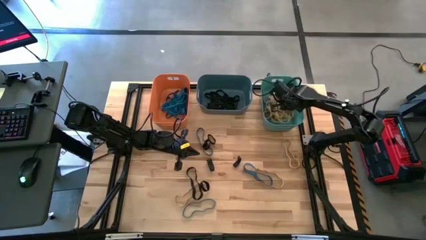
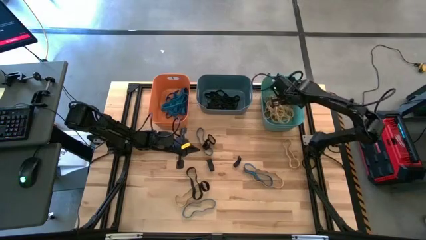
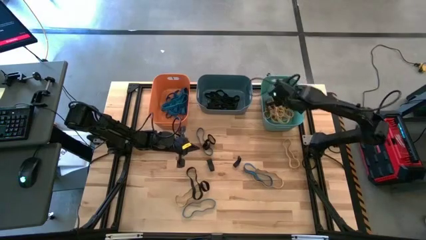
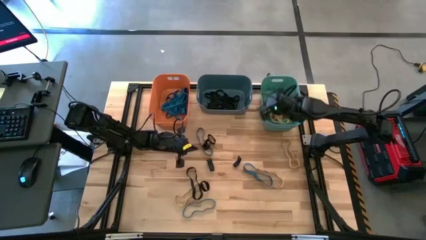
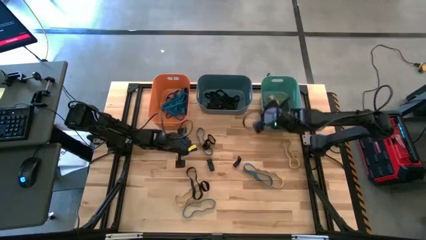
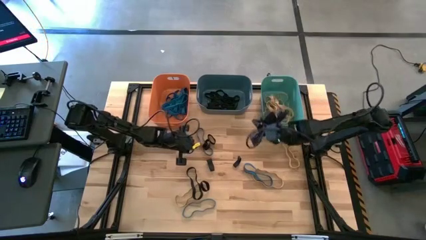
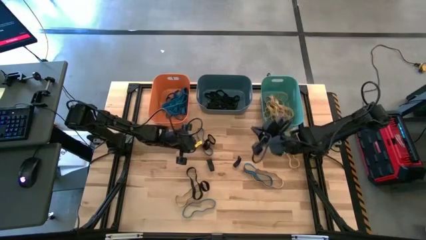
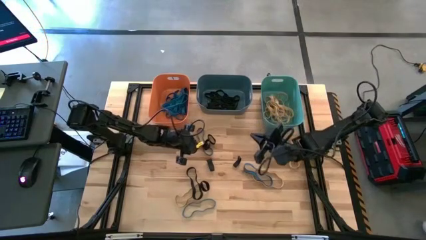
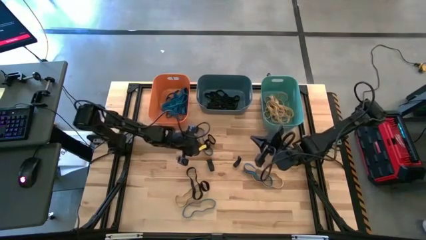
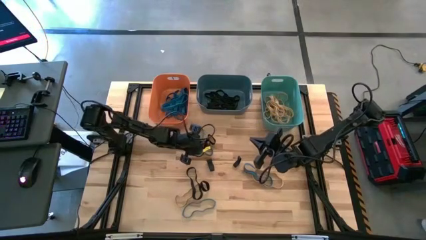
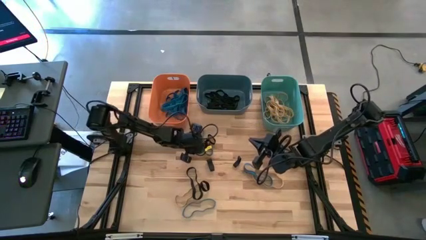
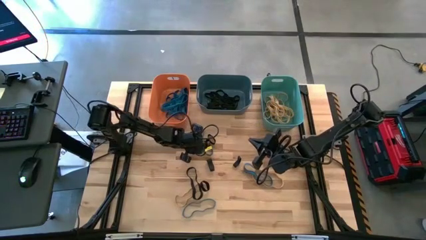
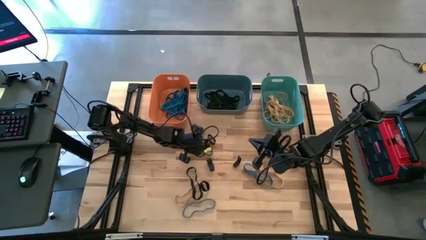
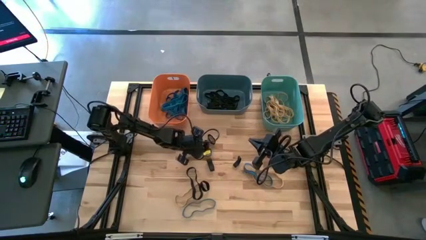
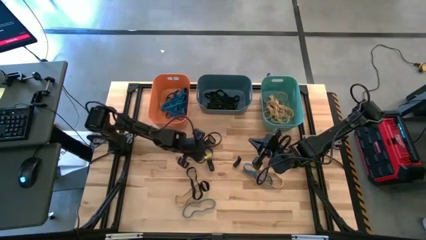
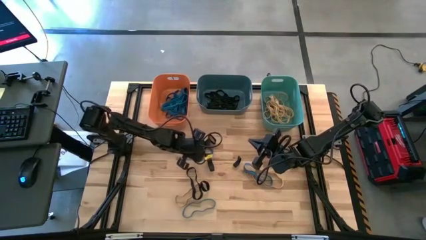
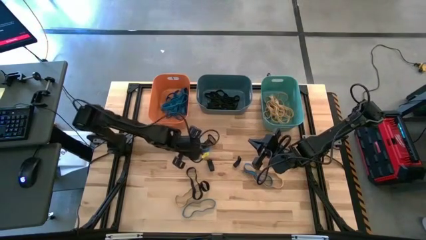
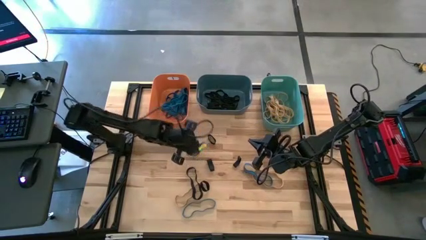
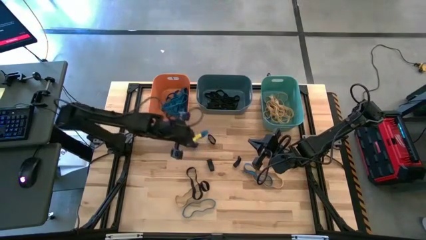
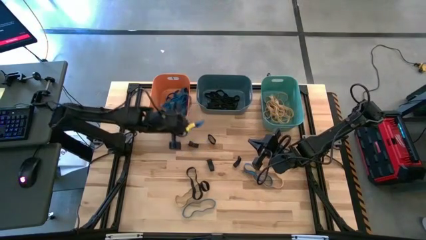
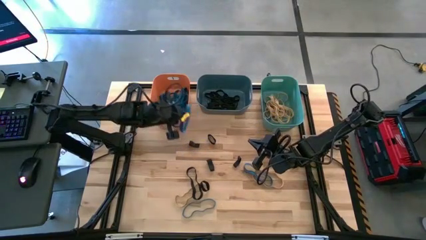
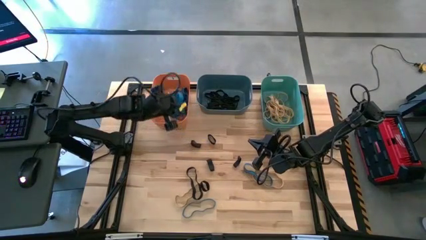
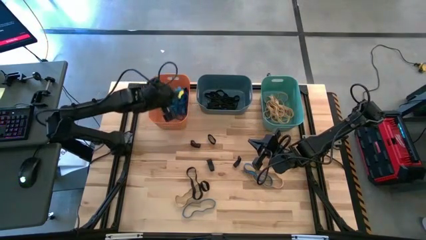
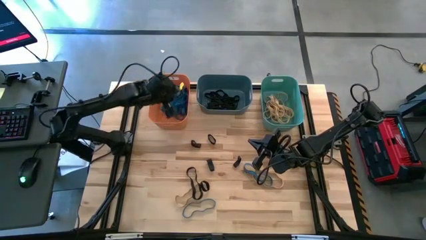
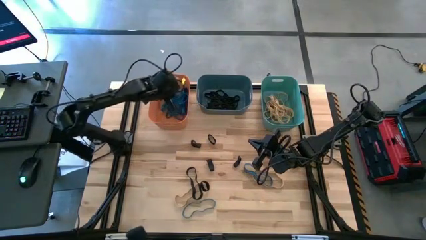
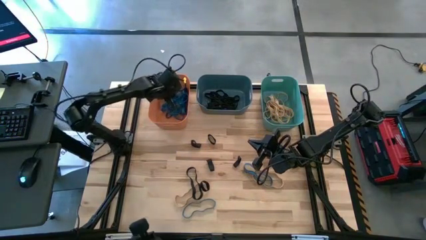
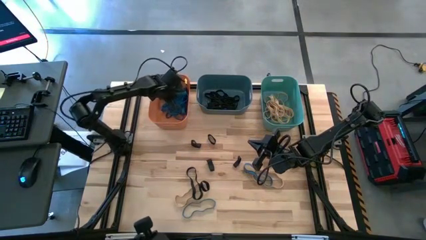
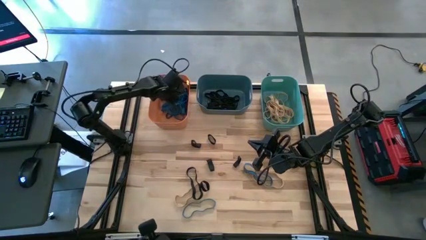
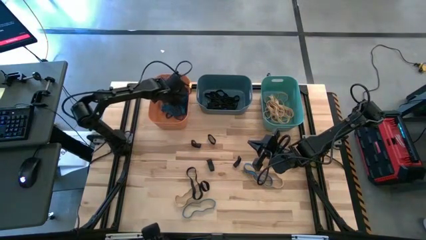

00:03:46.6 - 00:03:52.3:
Task: Sort rubber bands into baskets
Put the blue rubber band into the orange bin

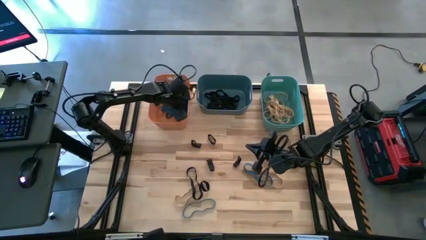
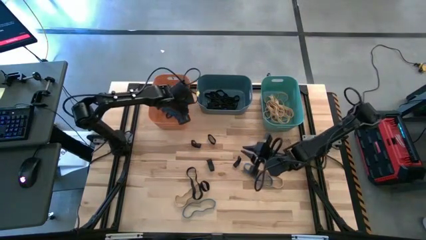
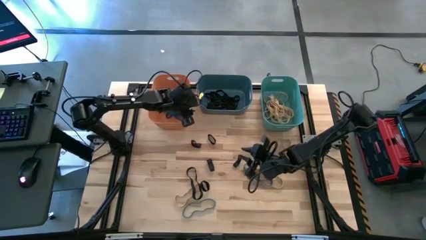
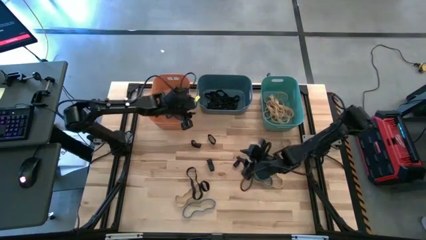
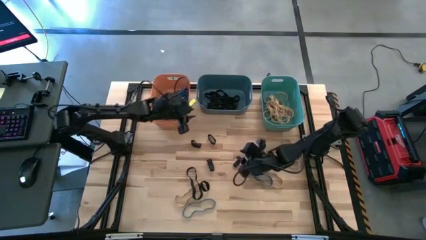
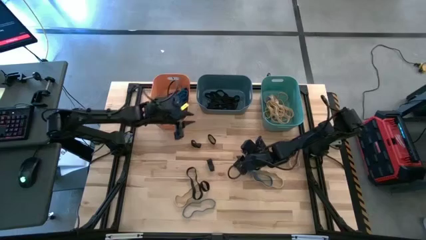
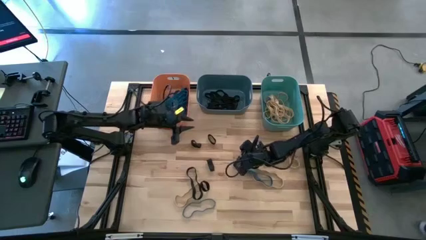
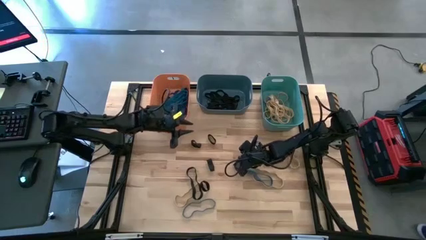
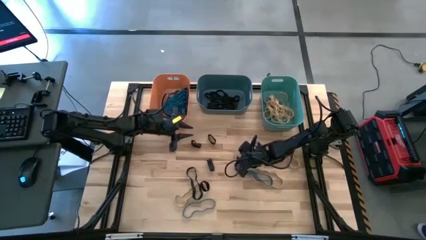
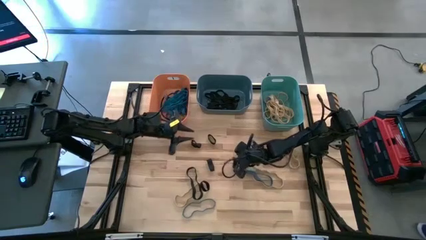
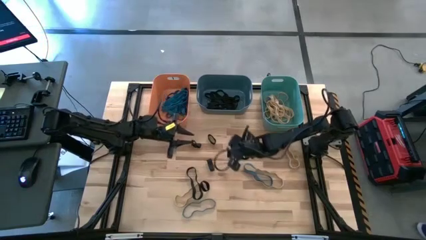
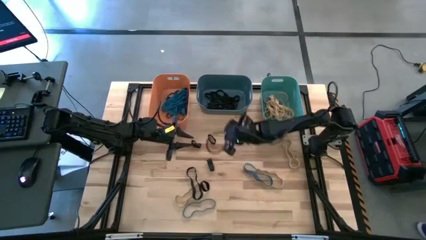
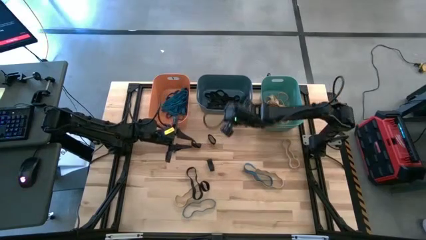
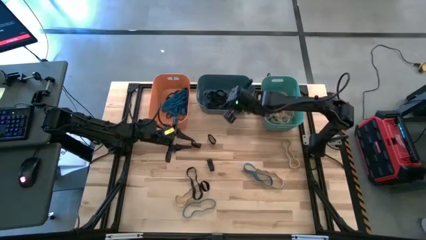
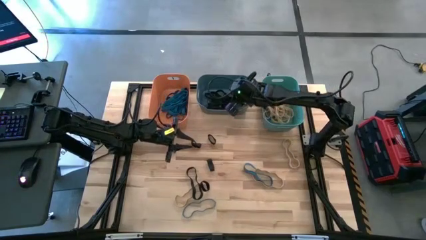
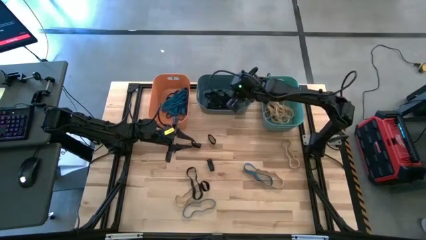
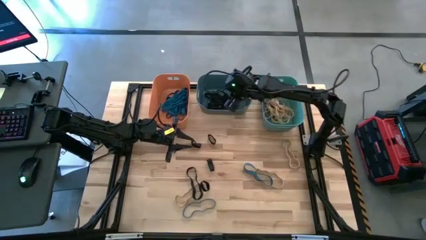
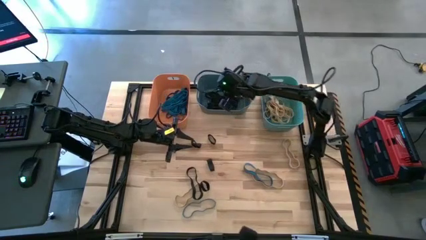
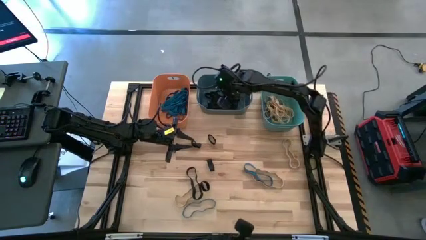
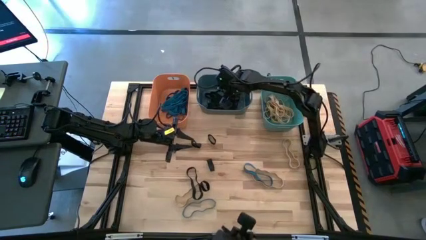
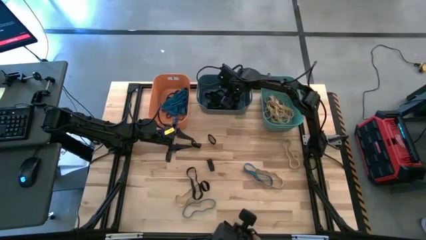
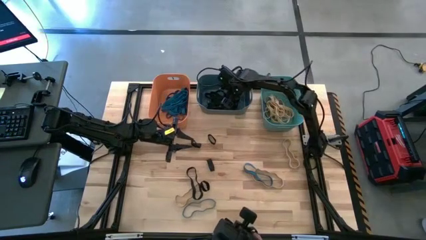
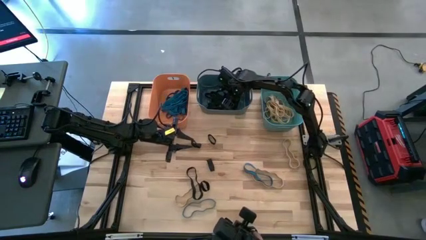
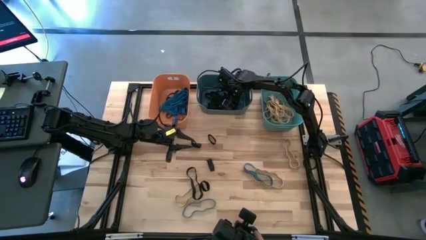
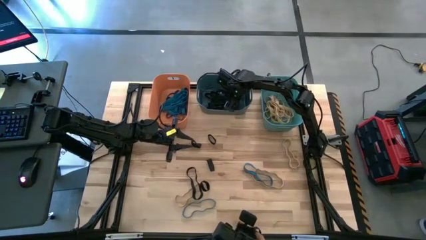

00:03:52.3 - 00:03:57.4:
Put the black rubber band into the blue bin

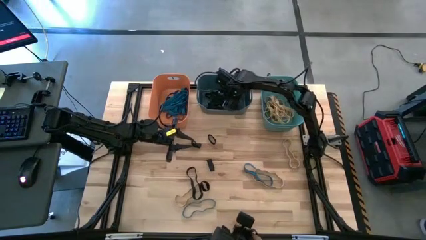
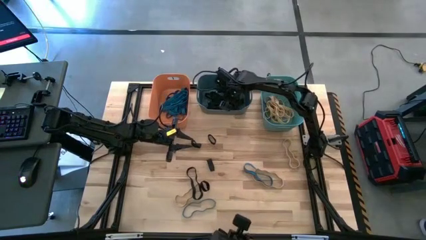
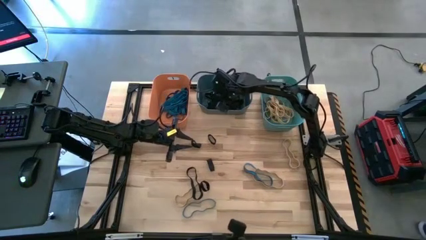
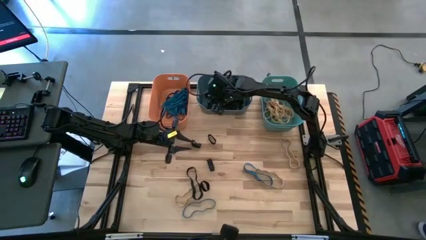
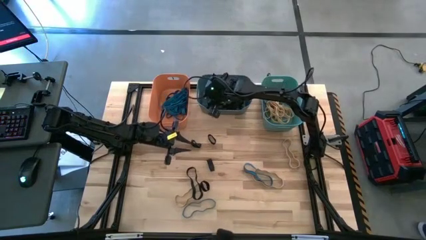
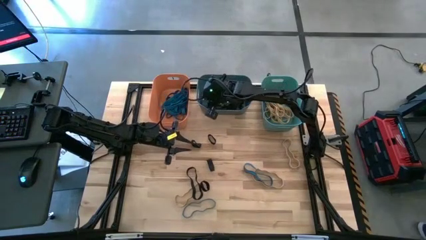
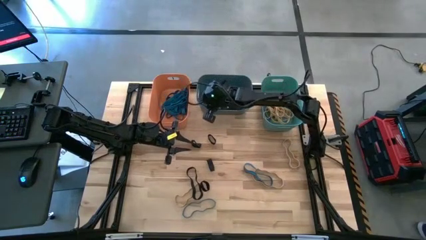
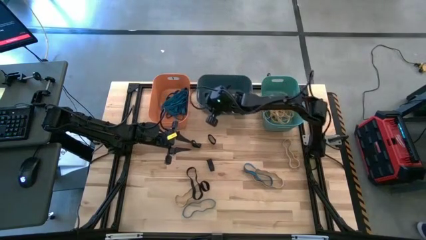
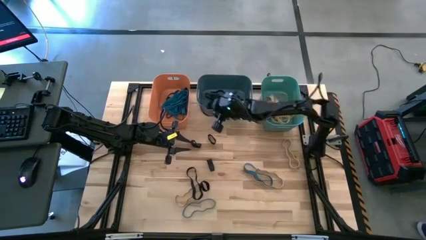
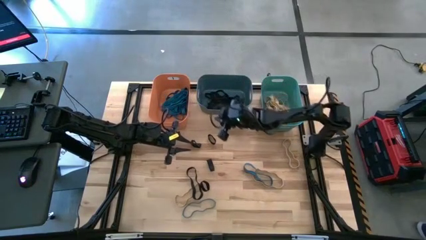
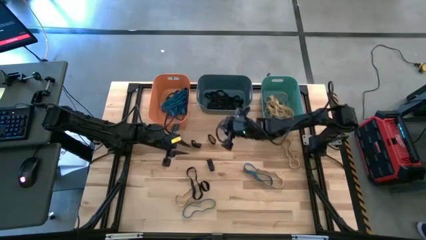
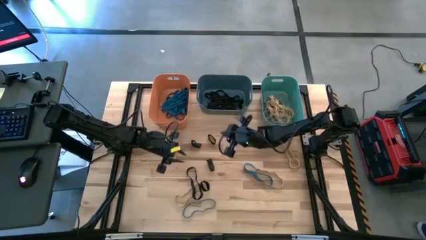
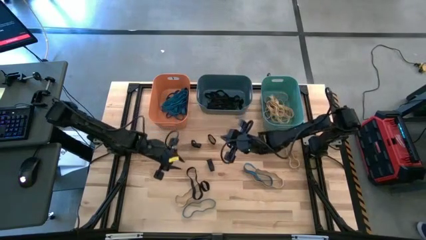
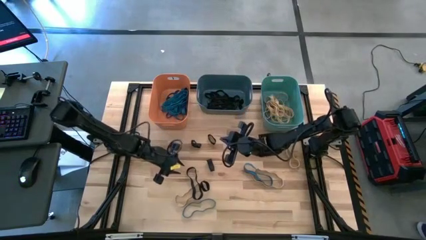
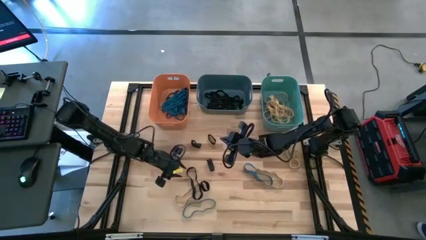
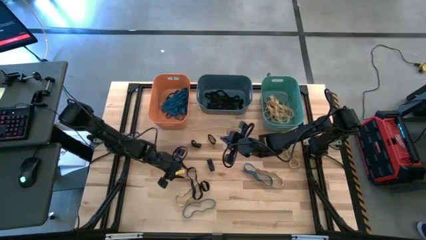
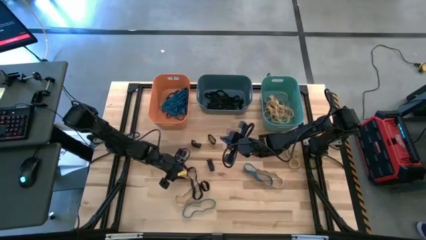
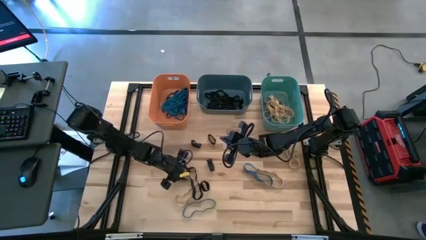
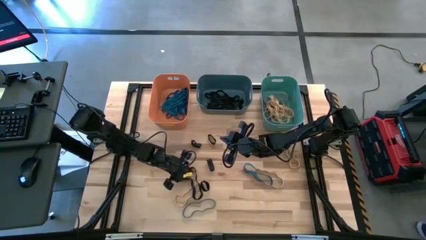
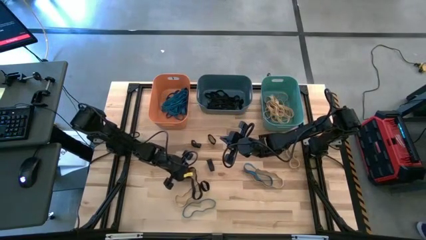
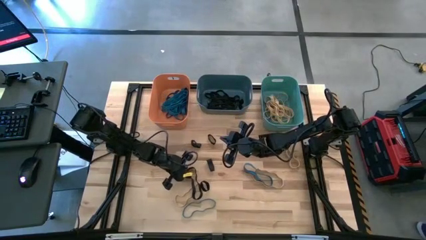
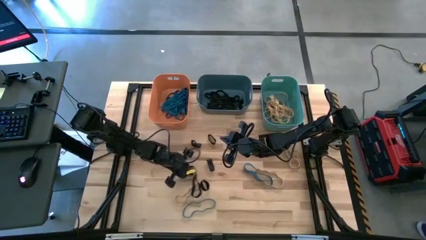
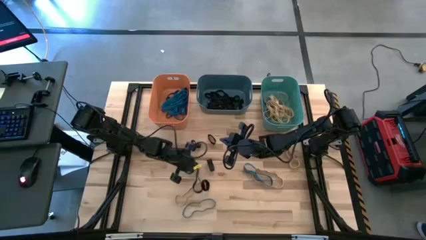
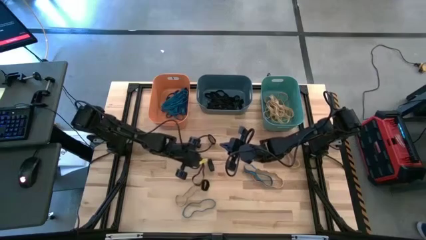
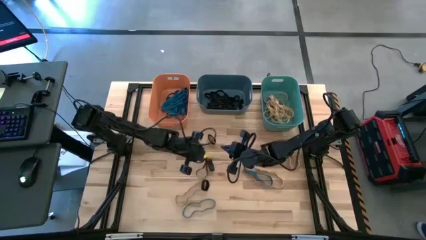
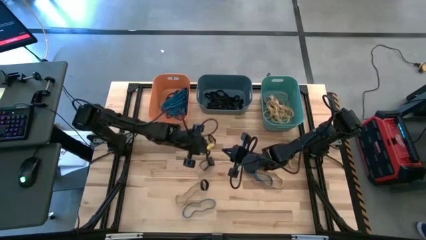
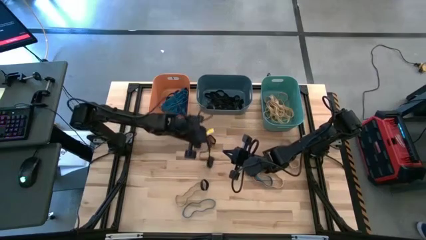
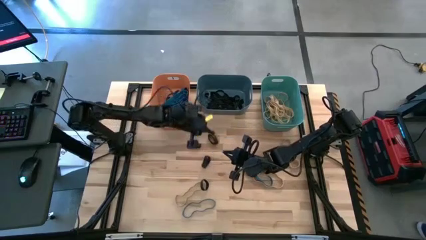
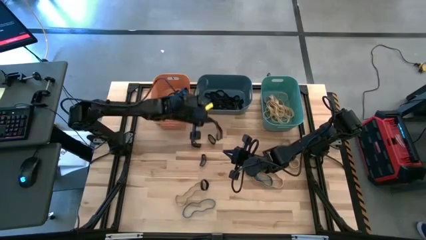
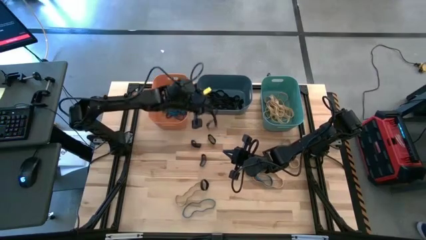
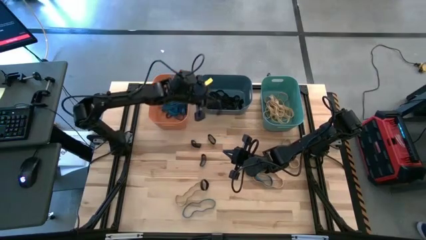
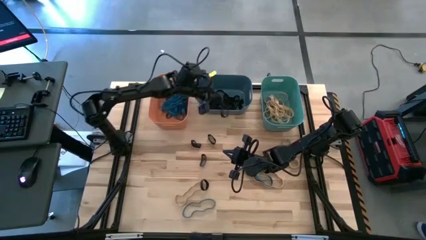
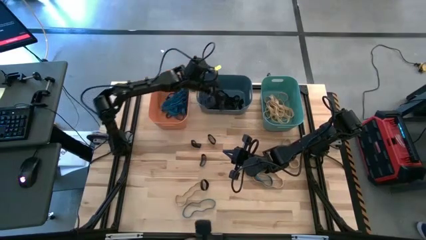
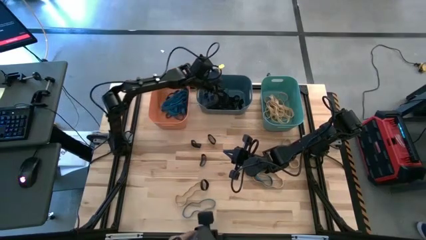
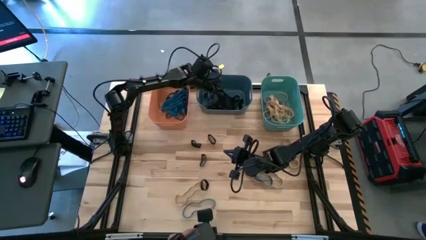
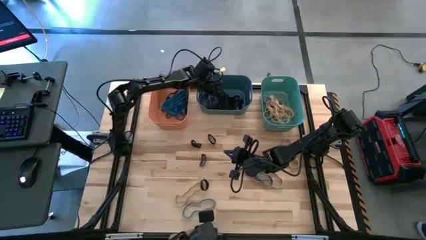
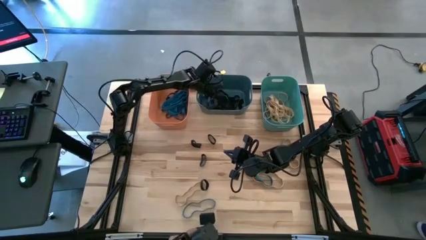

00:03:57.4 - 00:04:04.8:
Put the black rubber band into the blue bin
